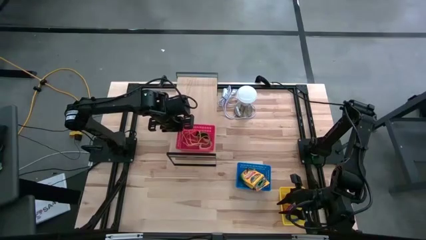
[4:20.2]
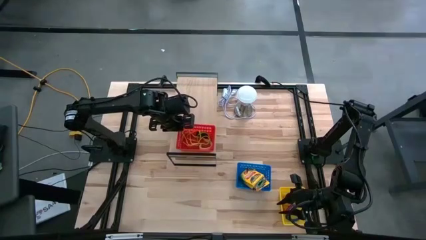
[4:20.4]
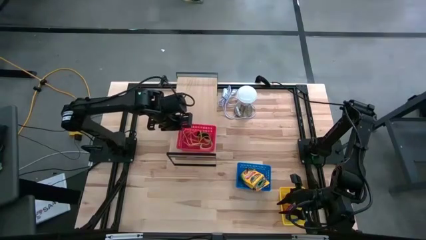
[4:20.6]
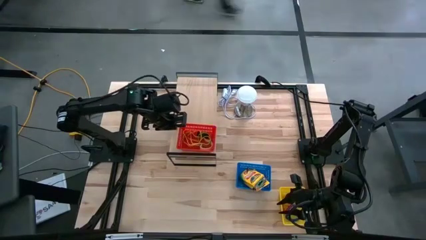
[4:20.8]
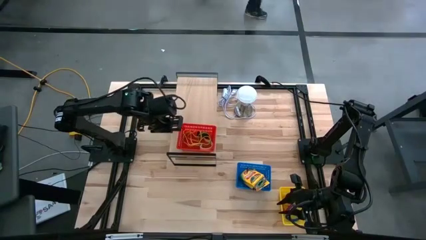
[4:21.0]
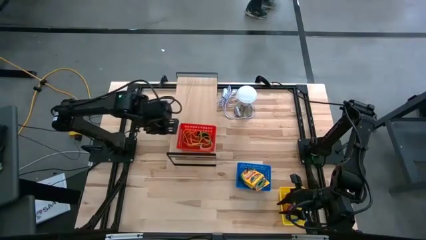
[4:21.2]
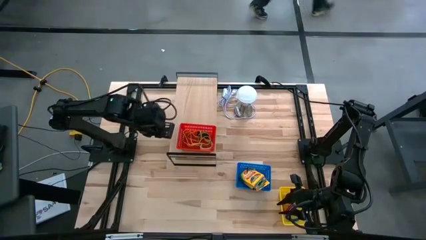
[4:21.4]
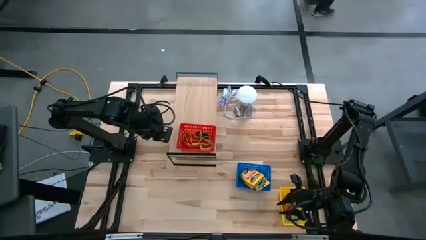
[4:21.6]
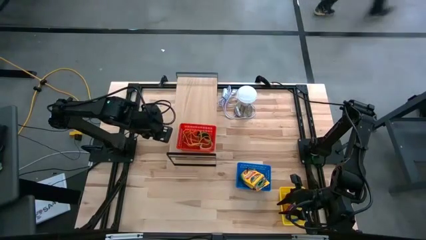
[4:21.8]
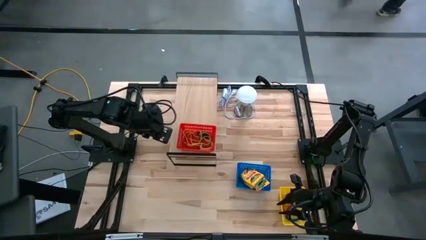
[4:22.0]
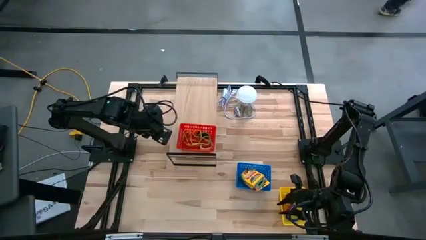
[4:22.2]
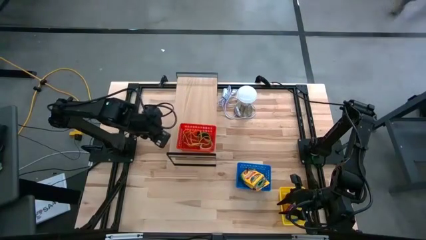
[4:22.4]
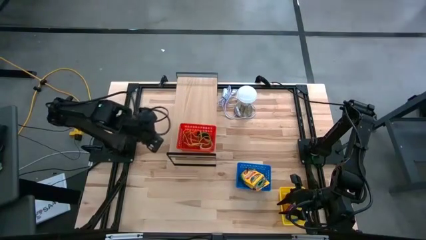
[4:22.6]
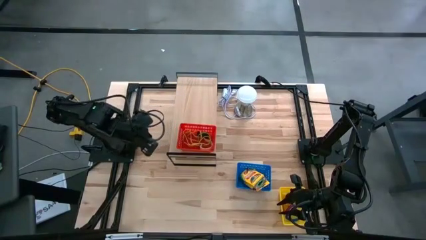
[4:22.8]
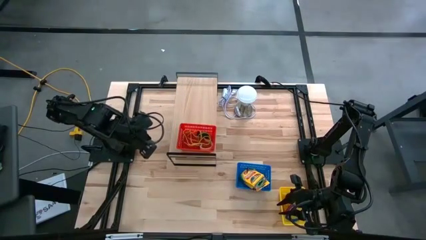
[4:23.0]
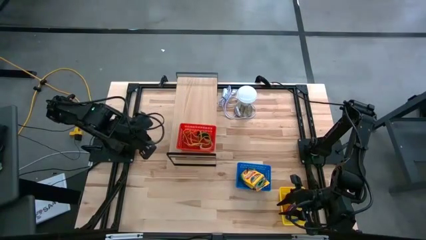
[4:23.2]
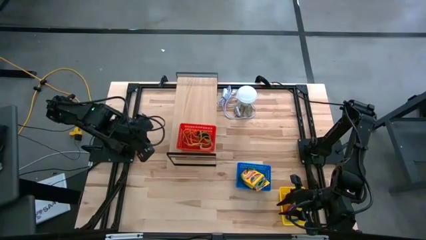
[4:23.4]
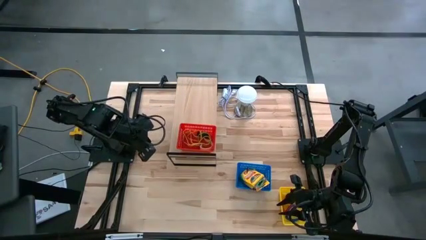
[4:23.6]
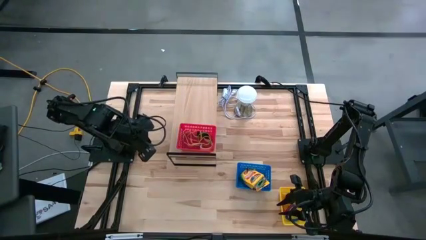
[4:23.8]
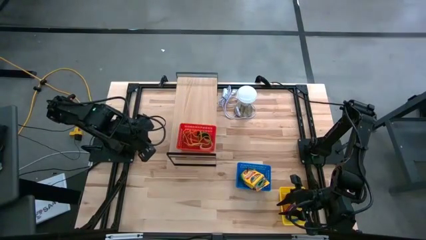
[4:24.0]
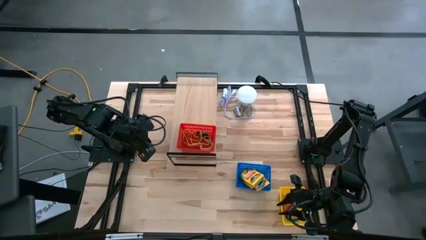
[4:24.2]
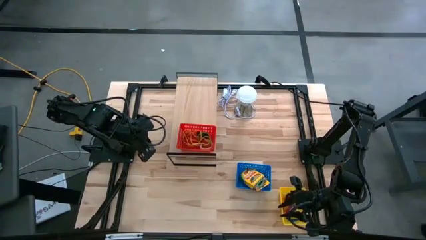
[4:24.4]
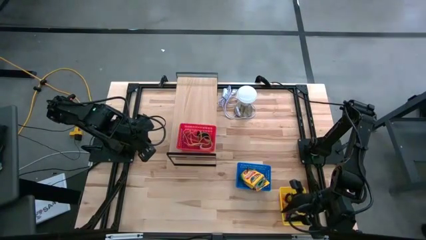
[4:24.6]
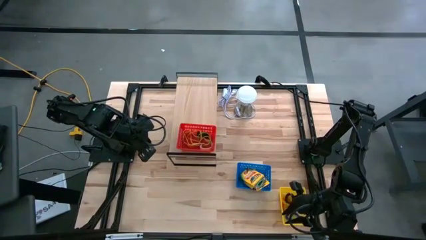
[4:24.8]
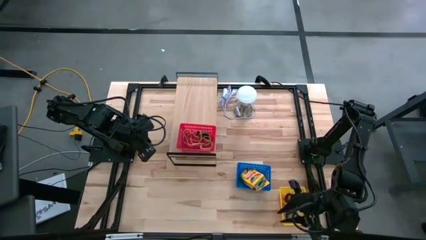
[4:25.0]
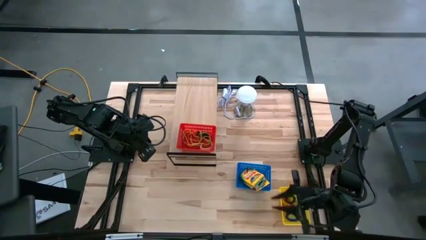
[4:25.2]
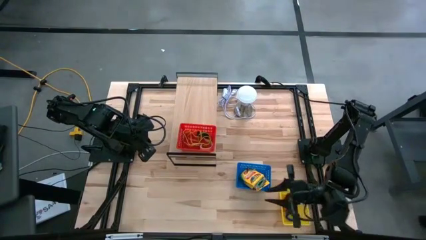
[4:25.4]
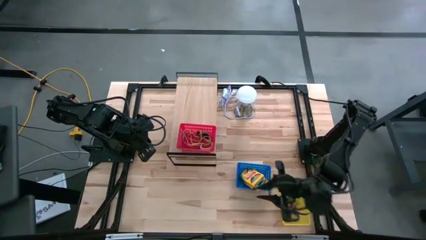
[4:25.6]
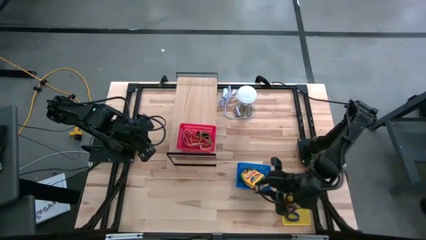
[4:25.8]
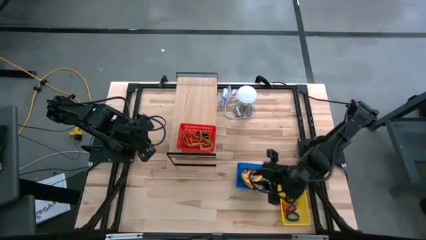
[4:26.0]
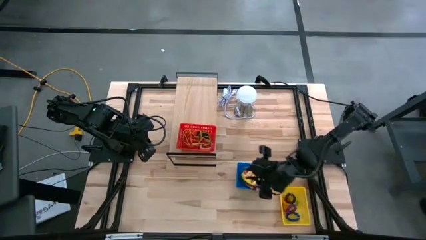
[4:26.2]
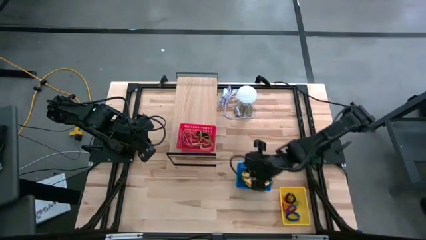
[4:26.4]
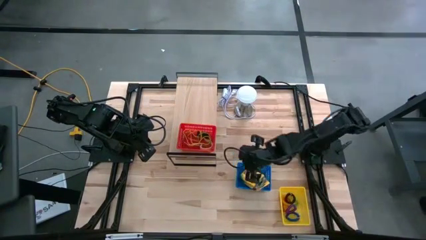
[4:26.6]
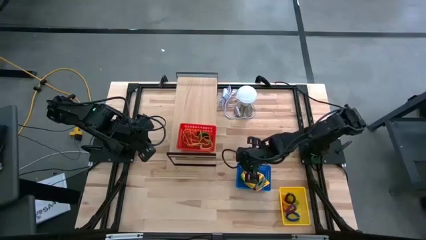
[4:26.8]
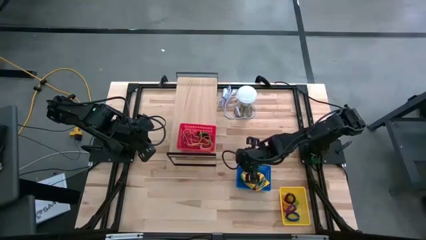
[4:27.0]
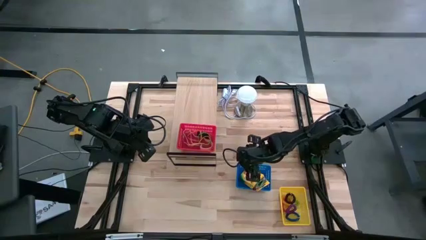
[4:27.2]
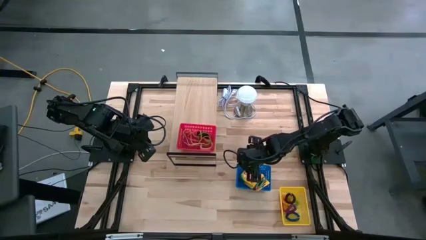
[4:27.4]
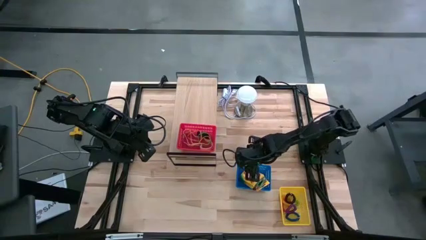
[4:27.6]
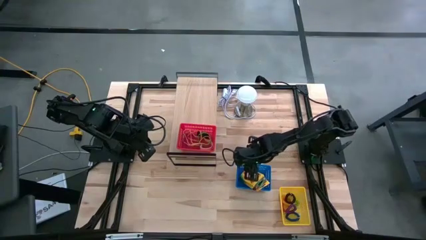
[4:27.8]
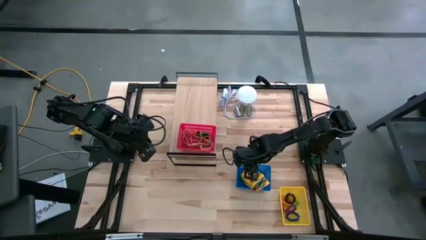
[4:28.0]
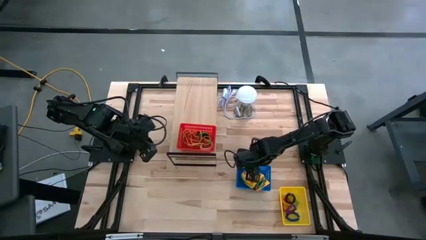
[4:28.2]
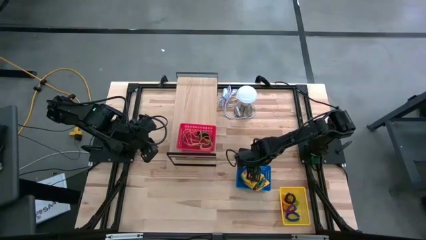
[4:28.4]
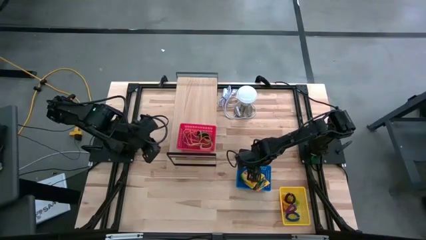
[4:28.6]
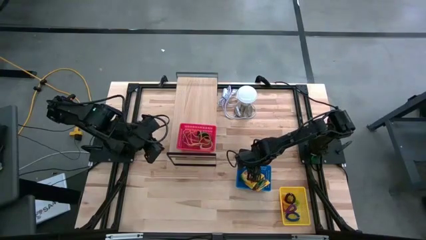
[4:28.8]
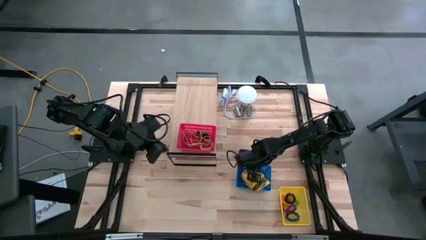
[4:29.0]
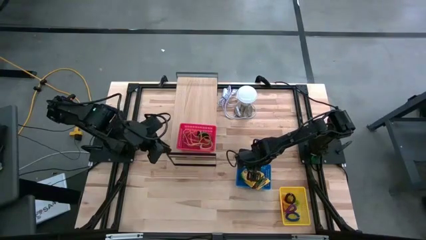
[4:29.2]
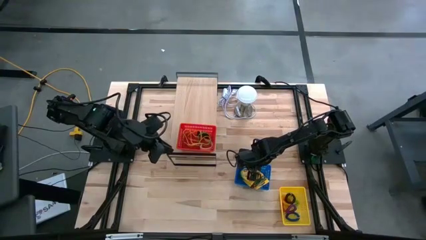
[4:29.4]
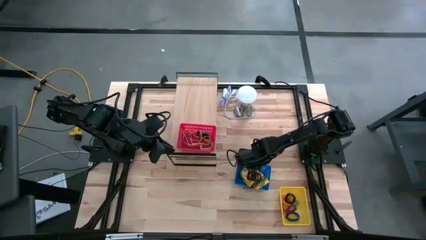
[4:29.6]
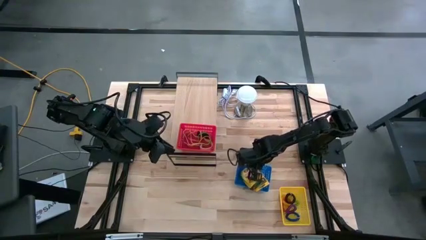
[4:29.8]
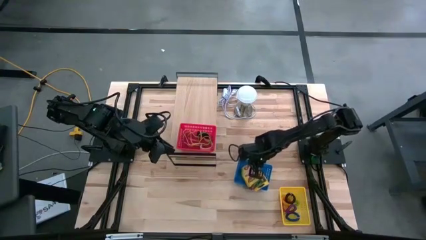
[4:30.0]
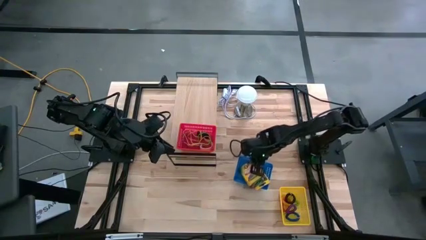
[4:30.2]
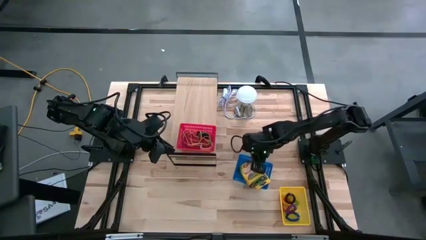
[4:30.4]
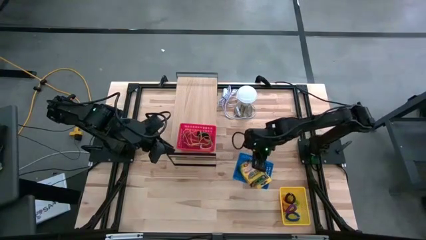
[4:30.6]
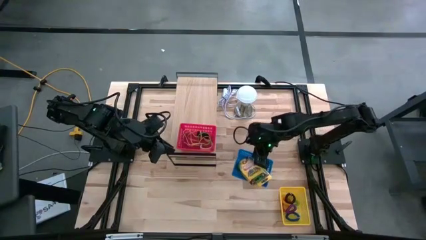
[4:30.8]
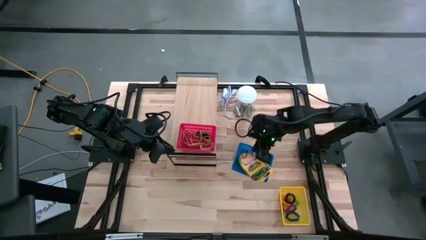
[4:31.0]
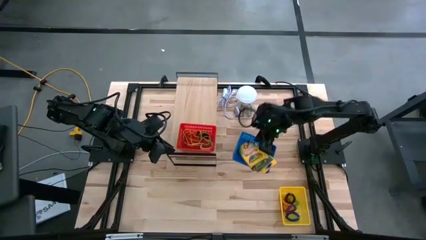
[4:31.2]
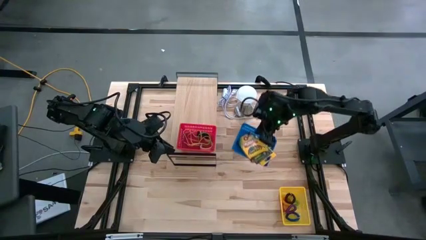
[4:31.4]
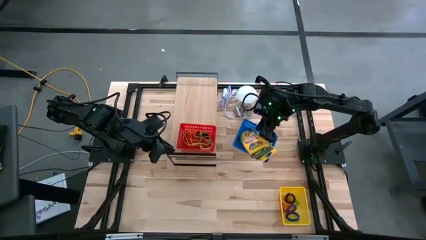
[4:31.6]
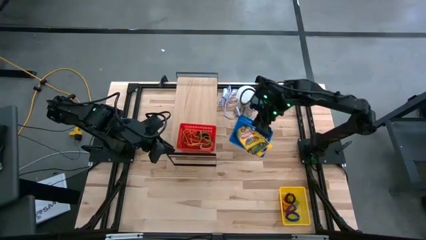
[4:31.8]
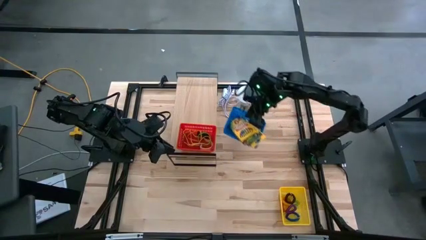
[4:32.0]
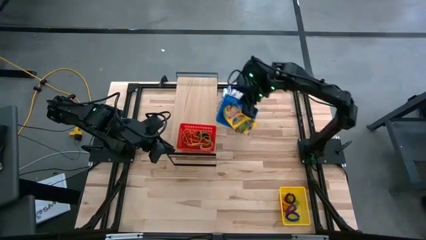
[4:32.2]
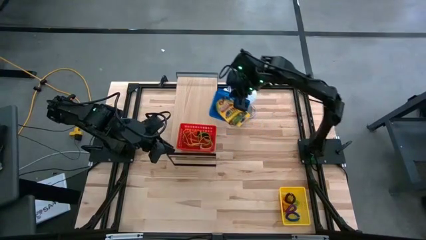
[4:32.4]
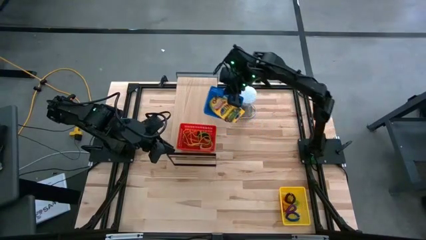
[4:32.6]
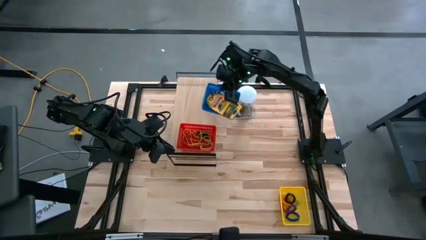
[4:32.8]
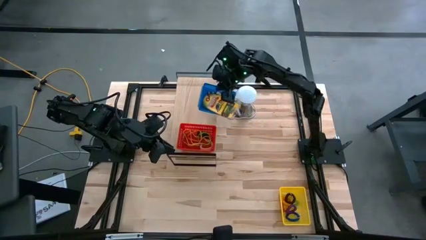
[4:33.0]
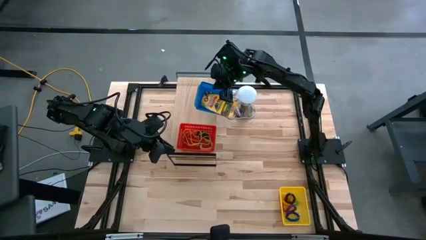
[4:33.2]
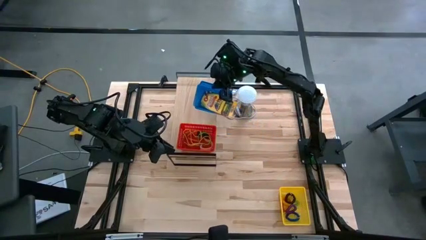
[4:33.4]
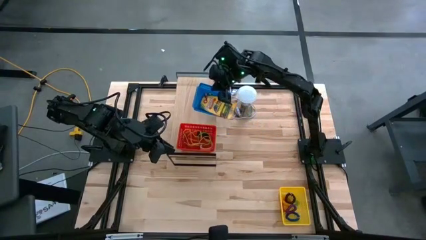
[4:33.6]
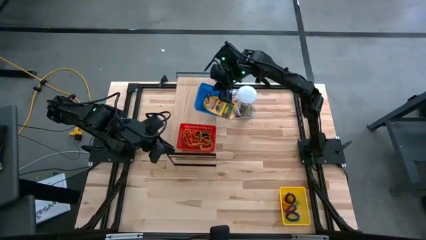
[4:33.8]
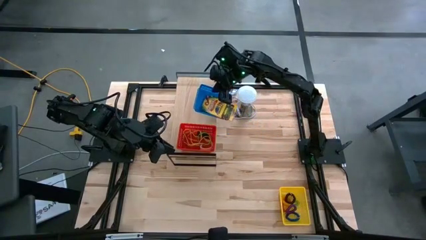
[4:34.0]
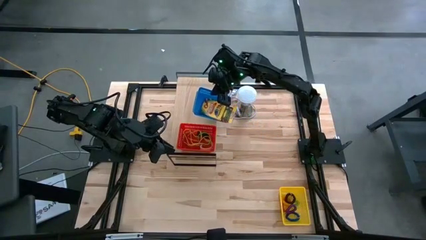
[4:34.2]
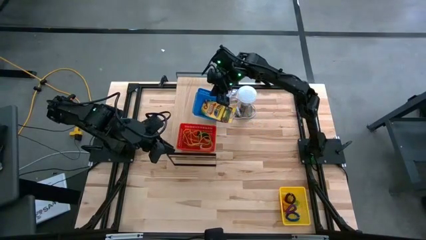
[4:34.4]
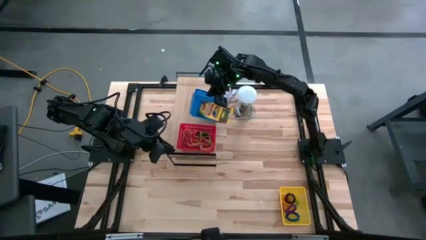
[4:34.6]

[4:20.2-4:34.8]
Task: Pick & Place Office Desk Supplies
Put the blue bin on the shelf

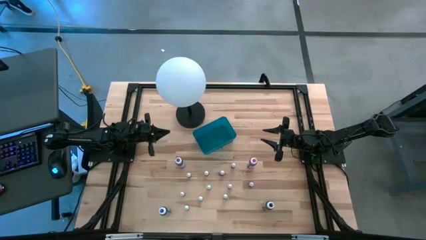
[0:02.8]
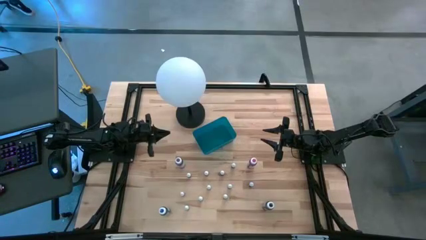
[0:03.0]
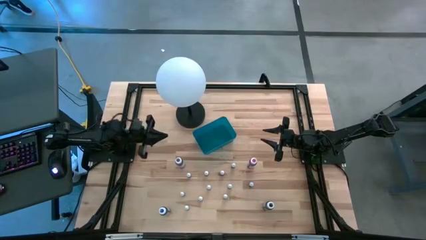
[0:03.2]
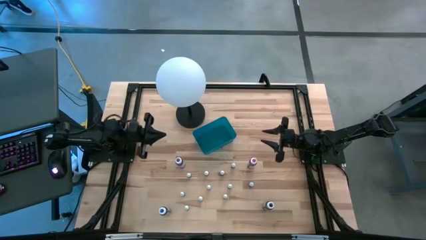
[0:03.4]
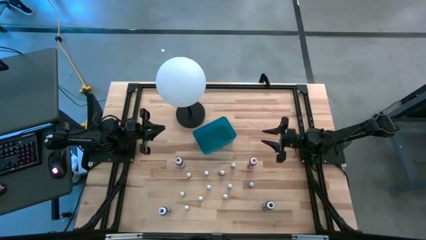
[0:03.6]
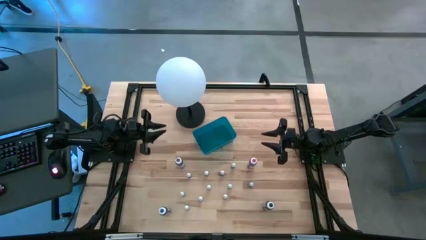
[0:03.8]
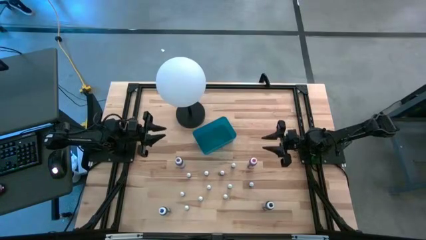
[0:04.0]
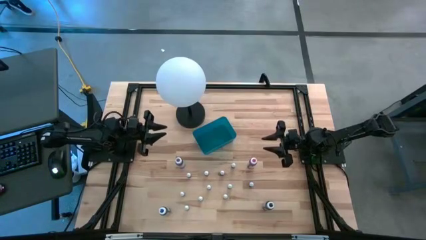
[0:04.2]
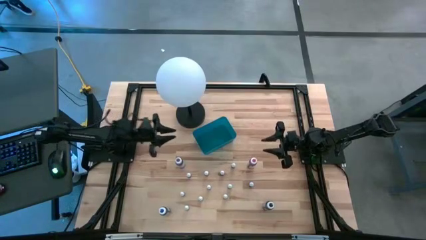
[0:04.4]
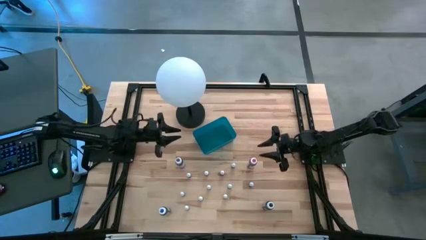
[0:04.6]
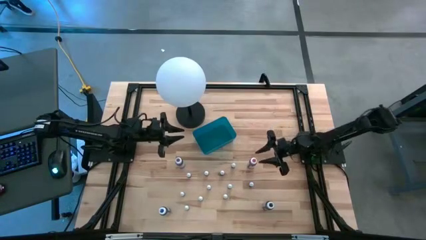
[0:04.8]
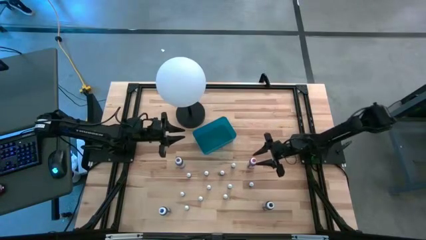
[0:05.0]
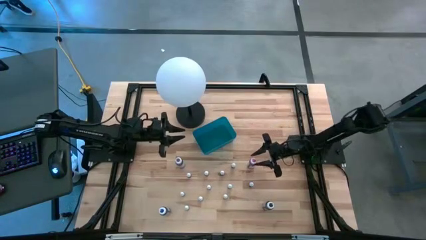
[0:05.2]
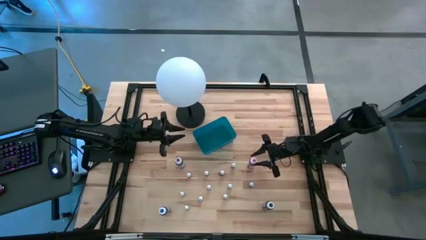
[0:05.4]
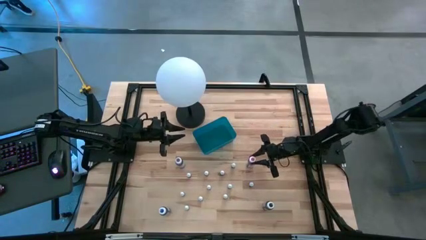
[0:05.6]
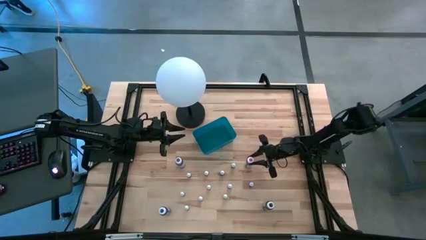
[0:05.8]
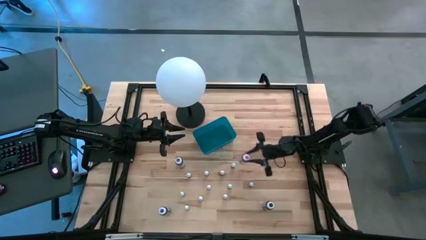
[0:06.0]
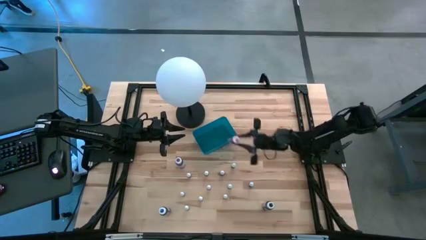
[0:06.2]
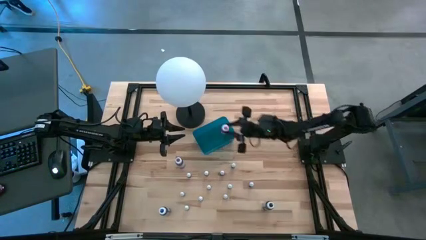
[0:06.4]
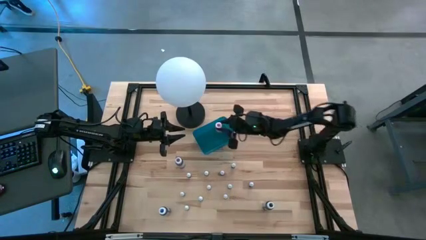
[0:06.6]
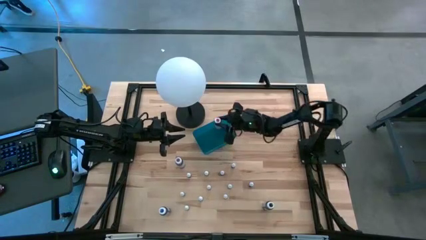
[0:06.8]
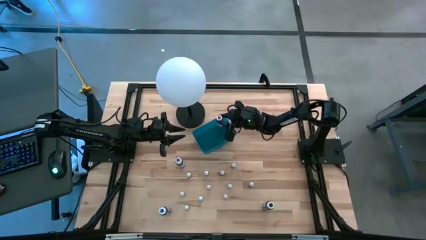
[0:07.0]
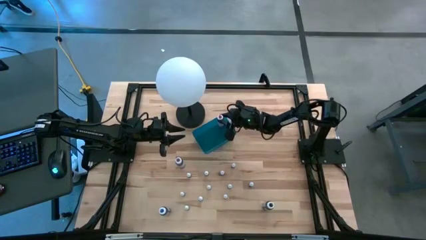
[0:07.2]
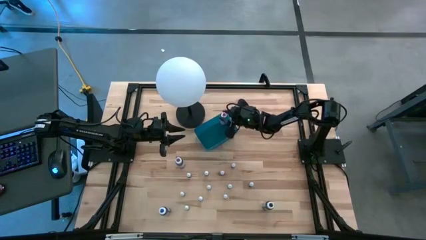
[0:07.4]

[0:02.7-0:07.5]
Task: Pick & Place food coloring
Put the large pink food coloring bottle into the bin
